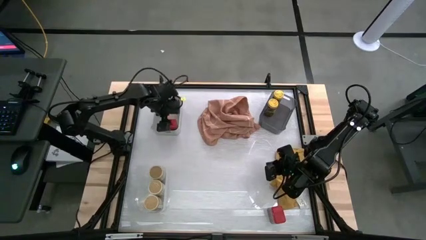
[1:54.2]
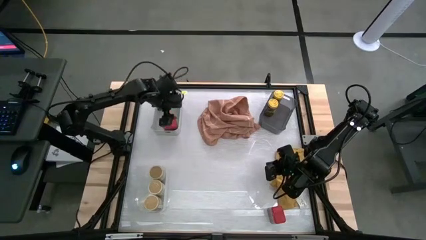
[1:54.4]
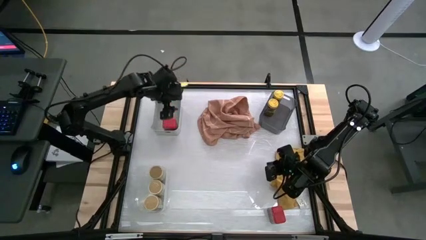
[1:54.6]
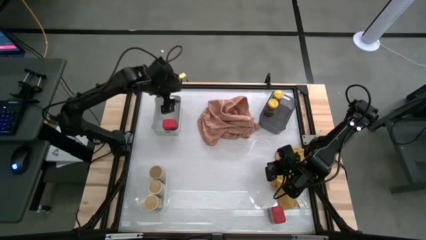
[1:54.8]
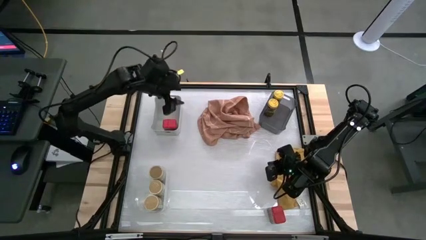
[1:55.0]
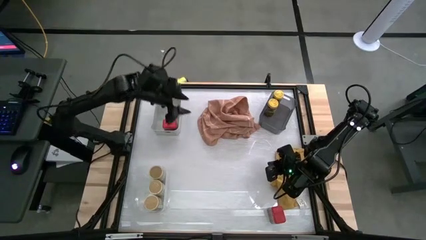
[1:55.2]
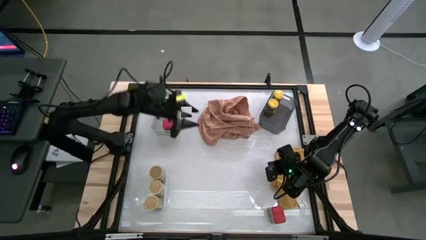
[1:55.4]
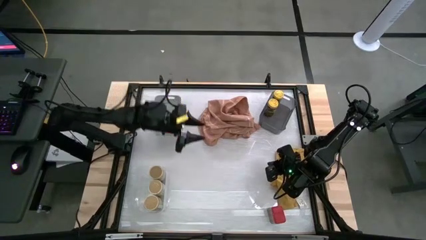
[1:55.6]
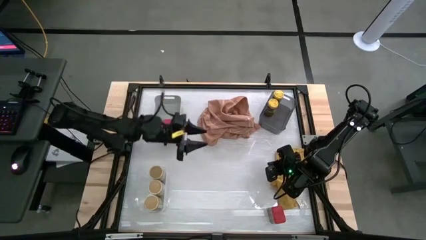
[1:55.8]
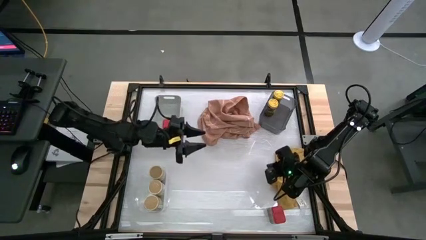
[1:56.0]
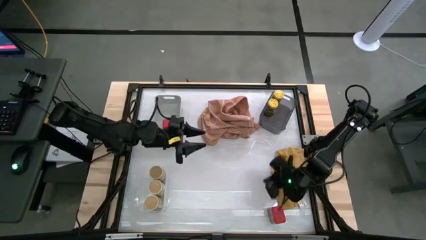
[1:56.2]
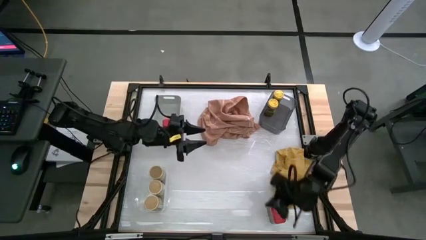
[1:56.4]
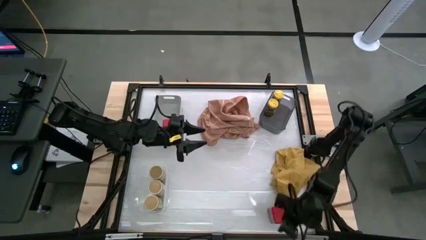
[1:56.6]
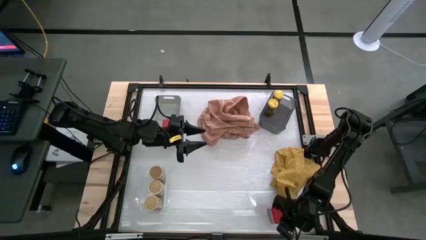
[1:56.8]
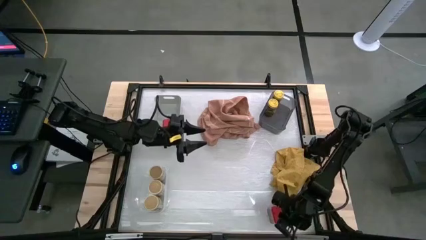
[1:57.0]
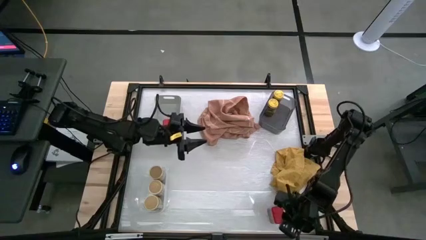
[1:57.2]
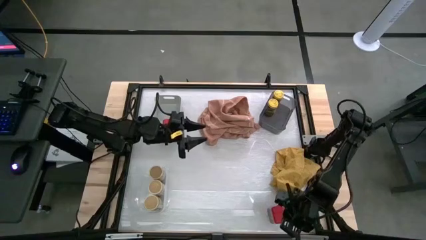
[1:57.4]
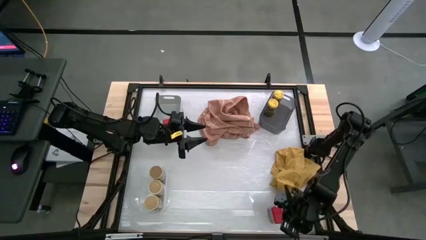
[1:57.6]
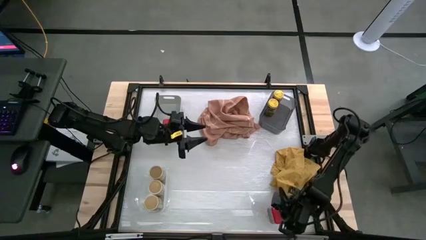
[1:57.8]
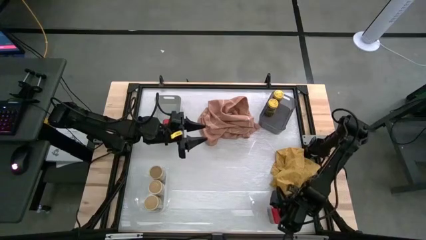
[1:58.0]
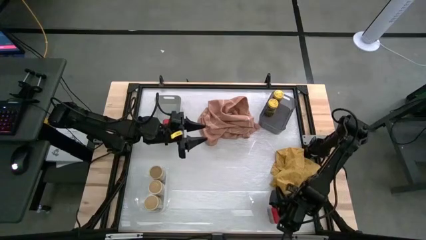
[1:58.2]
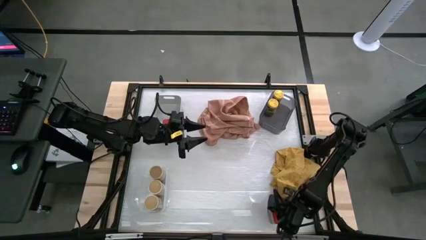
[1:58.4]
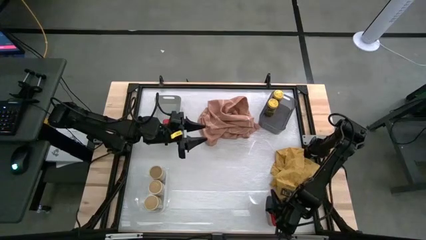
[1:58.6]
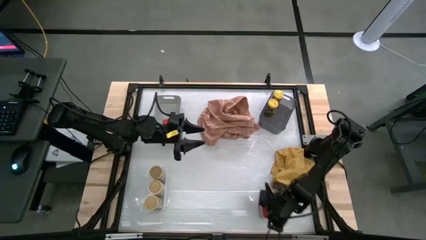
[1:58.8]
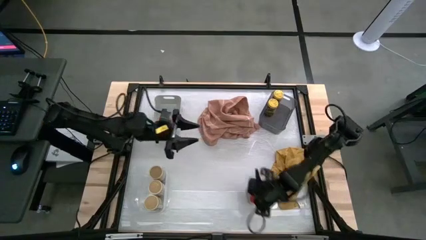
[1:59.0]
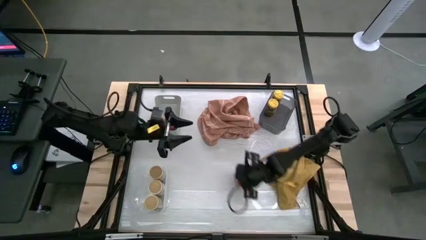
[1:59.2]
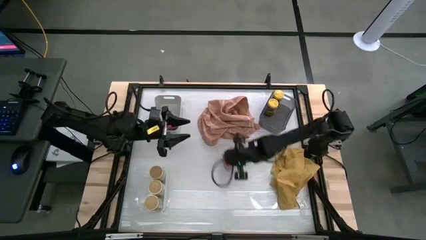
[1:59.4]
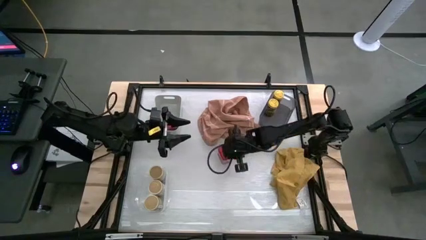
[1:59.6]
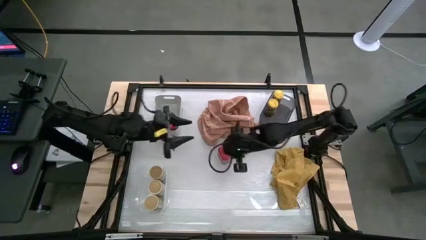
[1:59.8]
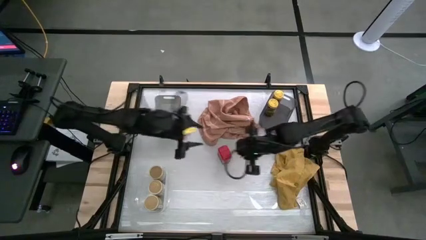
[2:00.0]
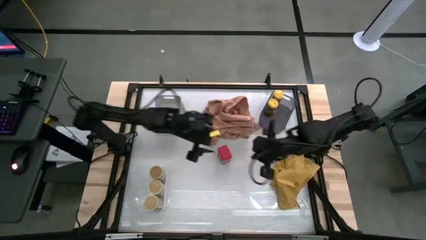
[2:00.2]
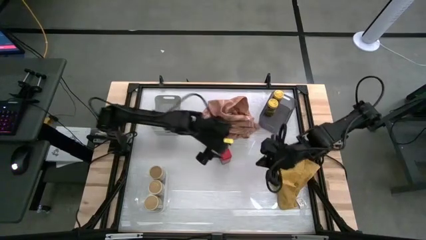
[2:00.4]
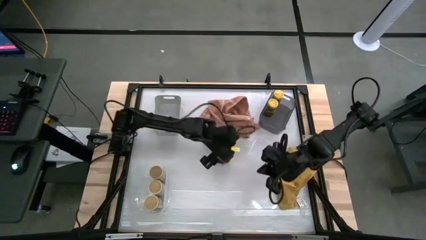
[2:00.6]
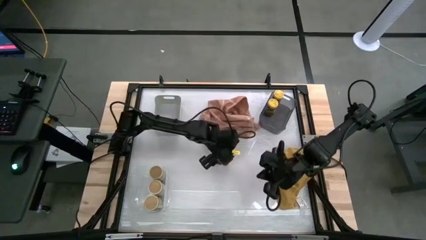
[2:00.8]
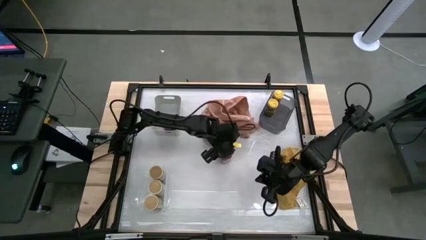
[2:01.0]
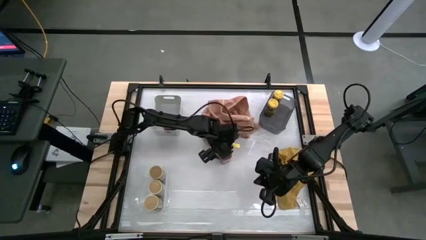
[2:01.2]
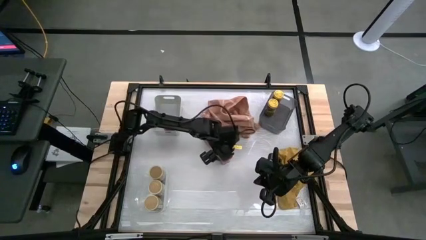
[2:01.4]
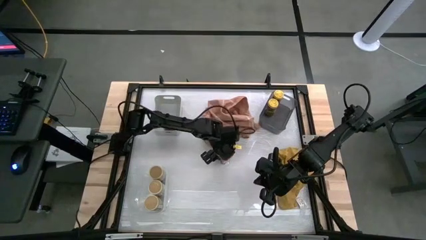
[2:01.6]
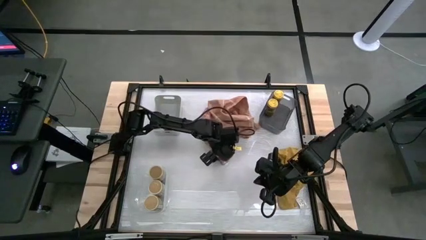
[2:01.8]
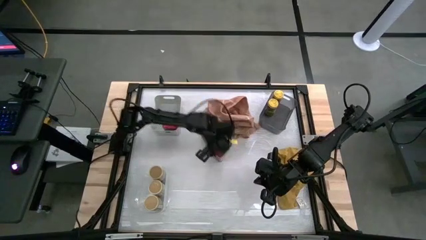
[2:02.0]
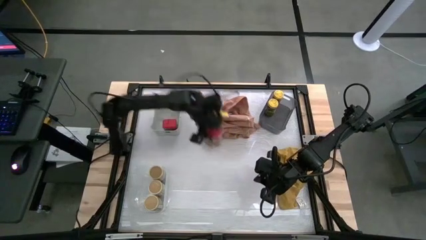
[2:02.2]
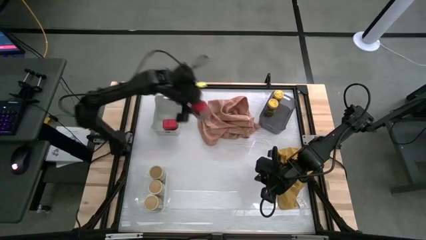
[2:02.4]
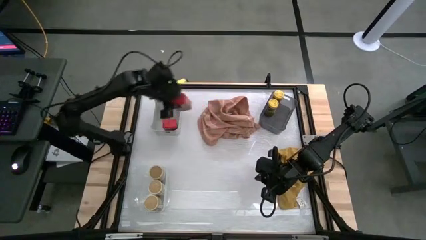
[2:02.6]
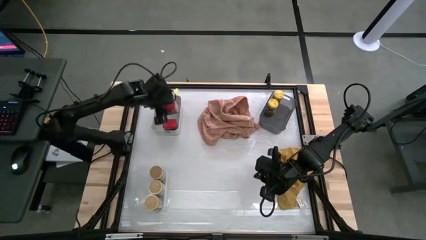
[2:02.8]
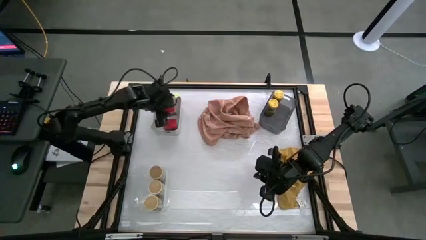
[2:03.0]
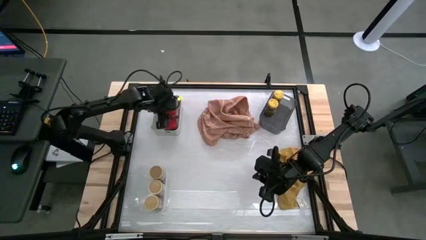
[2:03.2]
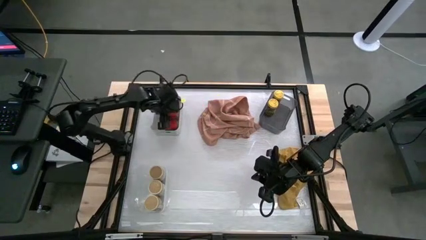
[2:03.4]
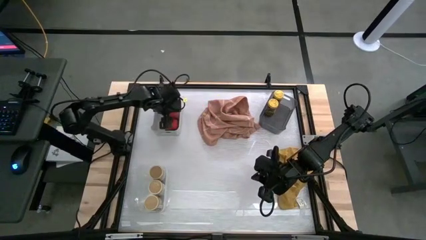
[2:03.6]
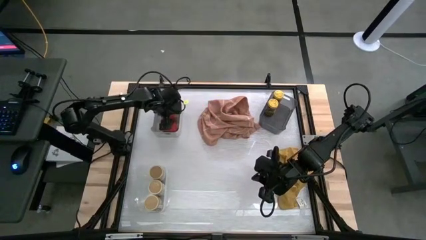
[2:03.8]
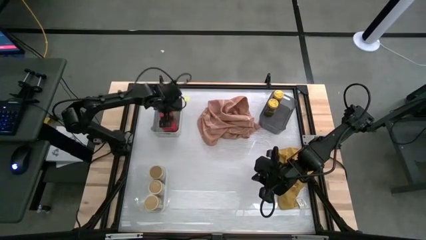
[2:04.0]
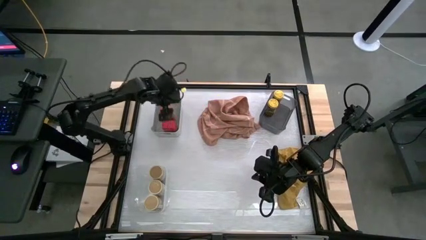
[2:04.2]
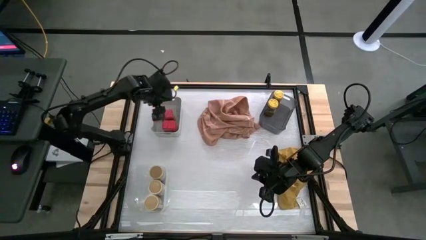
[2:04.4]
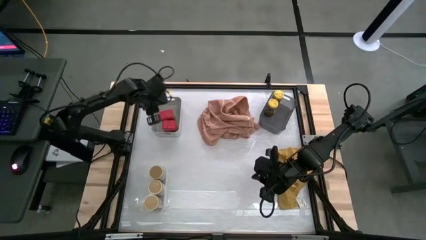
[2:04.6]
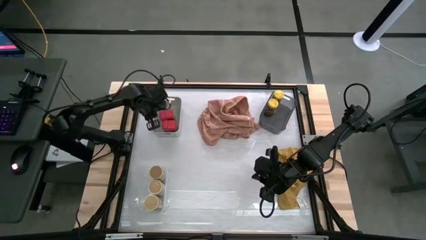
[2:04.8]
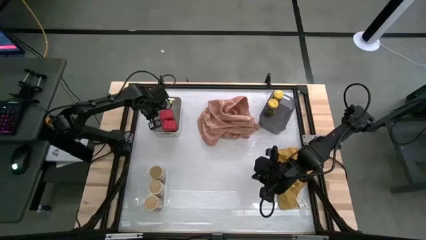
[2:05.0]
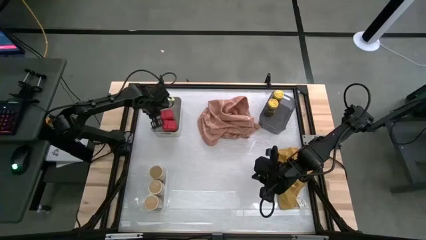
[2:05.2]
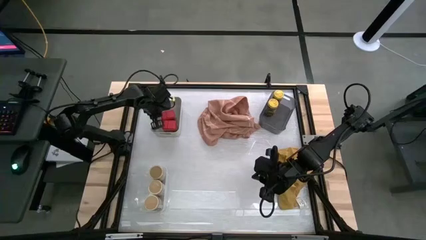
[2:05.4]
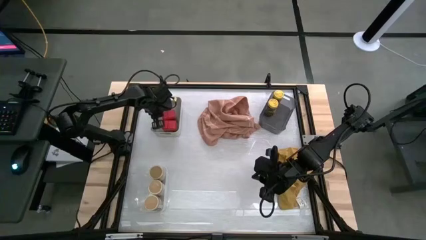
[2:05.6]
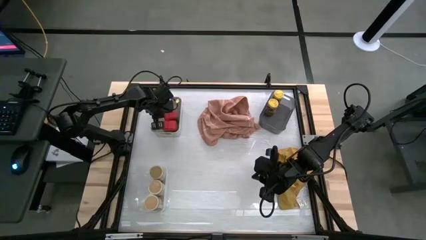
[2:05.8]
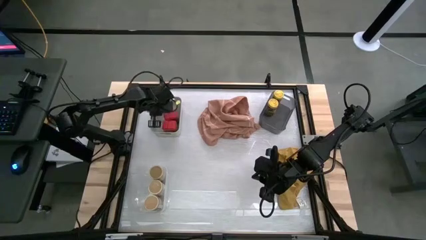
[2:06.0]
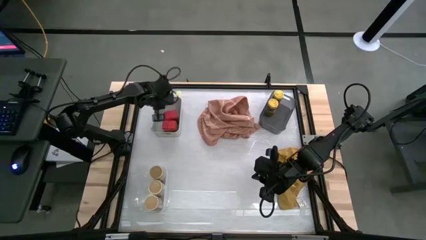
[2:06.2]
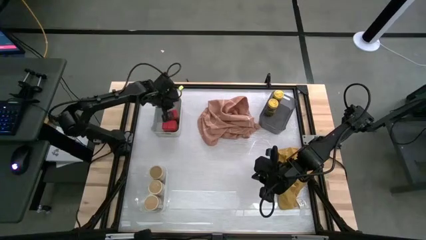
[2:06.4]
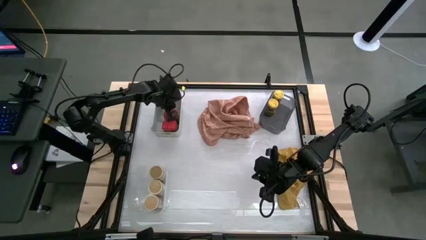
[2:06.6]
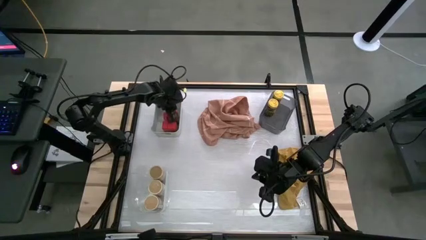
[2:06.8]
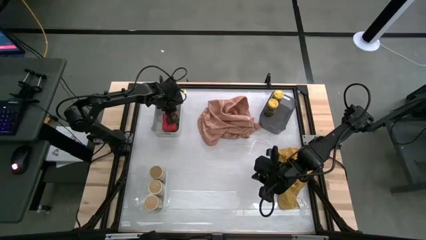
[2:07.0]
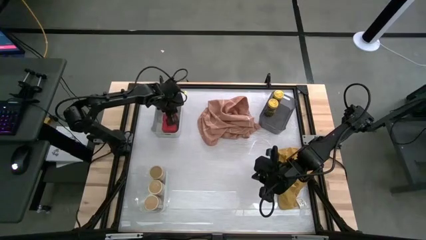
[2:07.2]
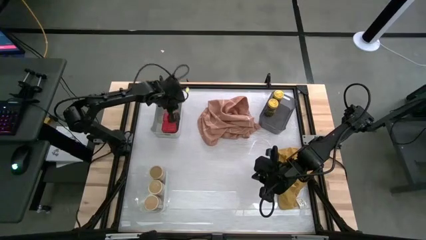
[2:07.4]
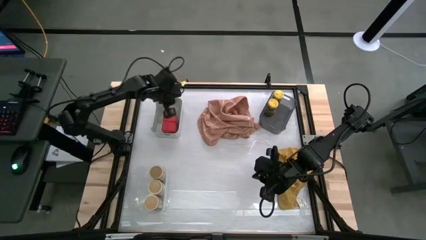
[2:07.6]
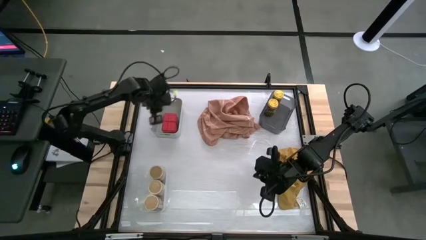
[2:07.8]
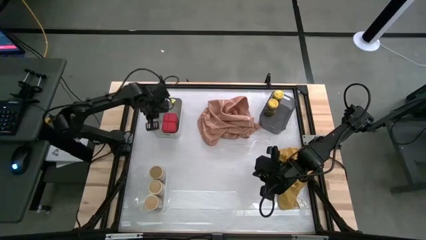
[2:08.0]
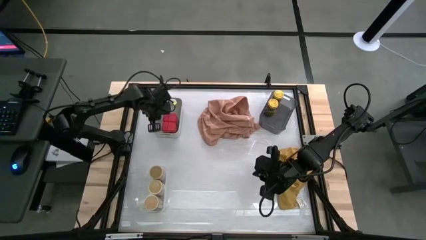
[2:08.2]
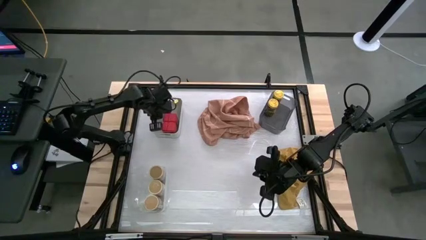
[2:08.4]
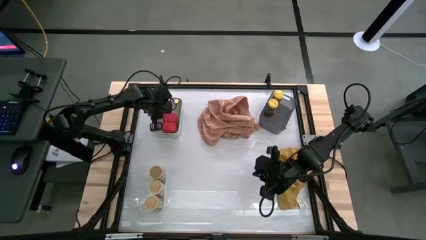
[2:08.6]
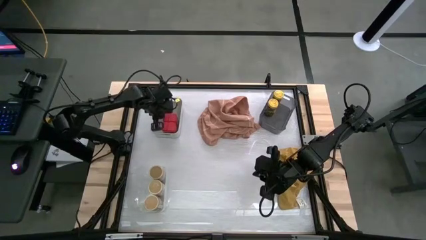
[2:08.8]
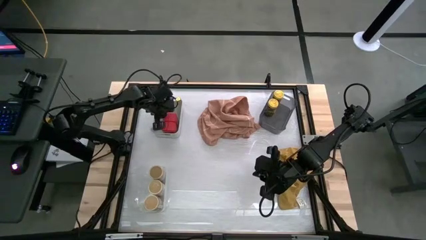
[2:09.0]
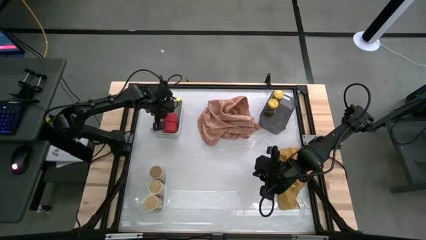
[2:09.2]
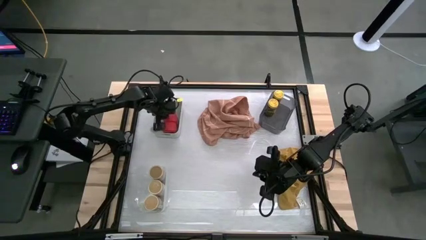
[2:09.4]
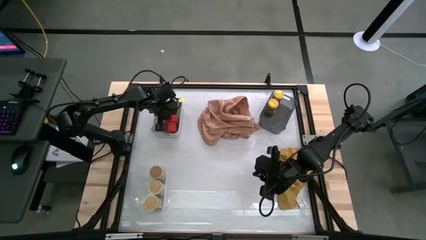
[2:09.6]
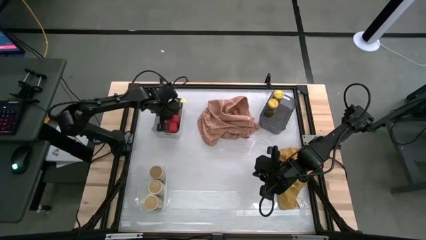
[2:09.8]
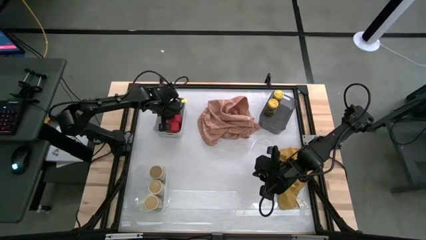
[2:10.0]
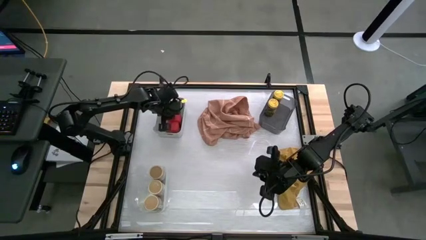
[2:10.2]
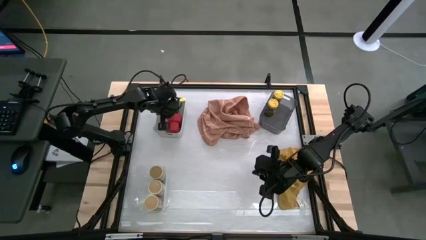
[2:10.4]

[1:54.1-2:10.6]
Task: Sort spices by type
Put the red seasoning can into the gray bin
